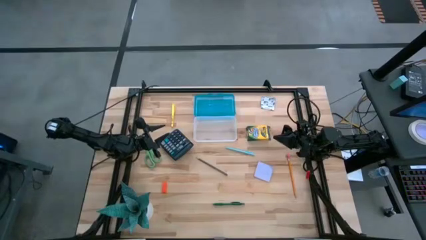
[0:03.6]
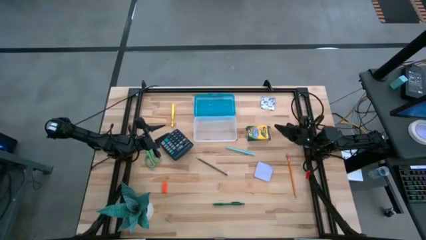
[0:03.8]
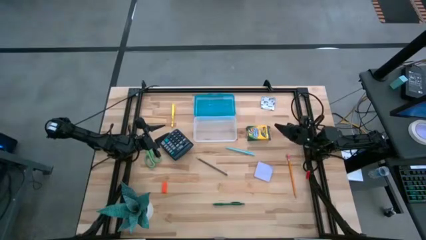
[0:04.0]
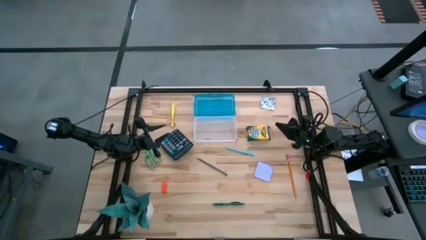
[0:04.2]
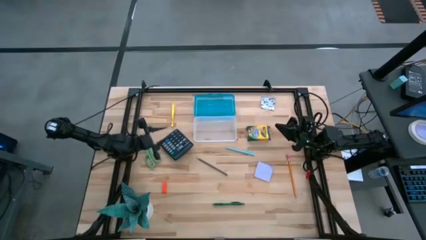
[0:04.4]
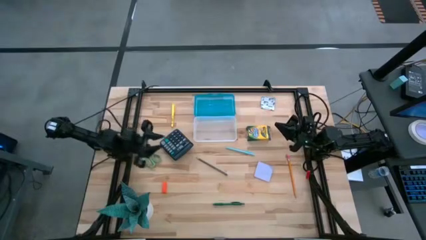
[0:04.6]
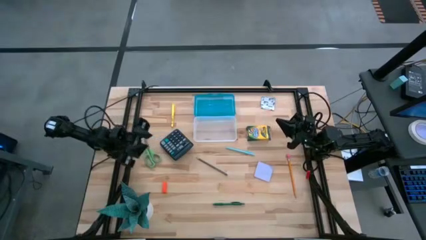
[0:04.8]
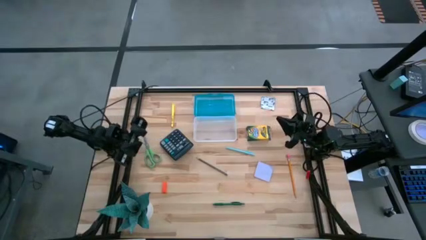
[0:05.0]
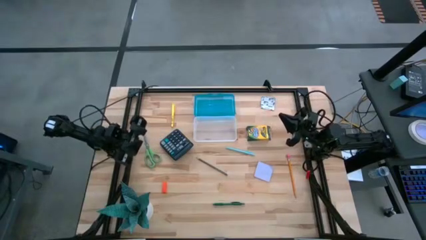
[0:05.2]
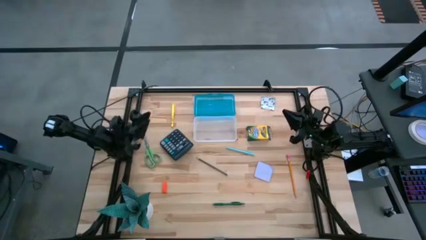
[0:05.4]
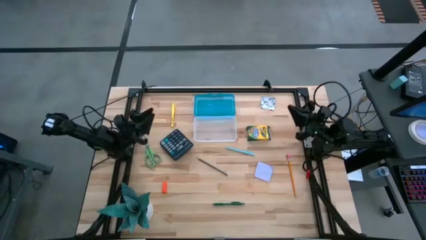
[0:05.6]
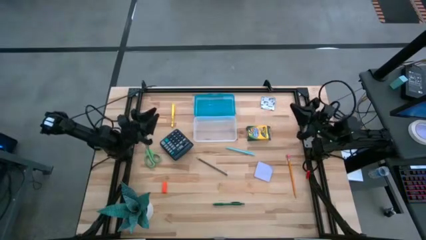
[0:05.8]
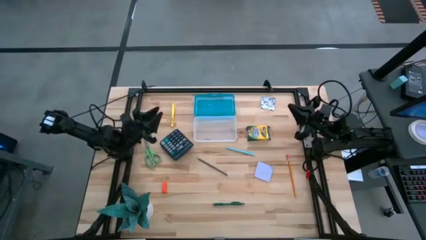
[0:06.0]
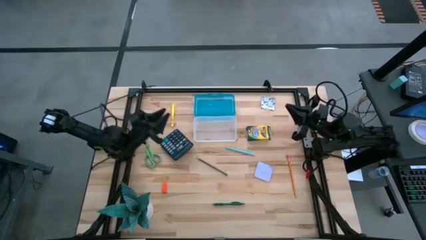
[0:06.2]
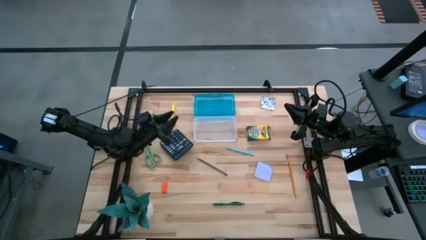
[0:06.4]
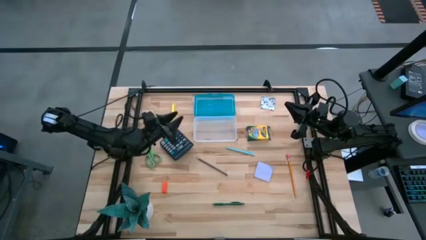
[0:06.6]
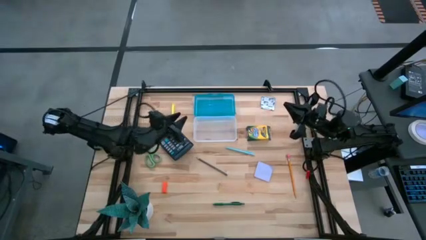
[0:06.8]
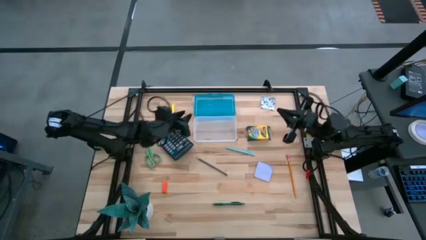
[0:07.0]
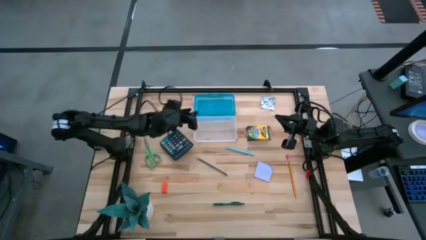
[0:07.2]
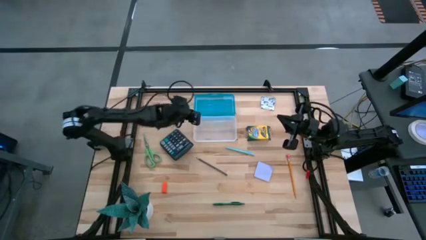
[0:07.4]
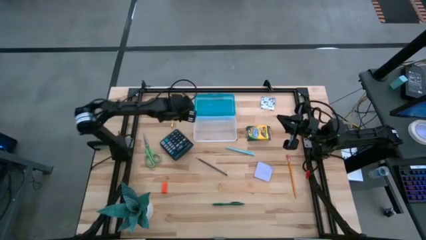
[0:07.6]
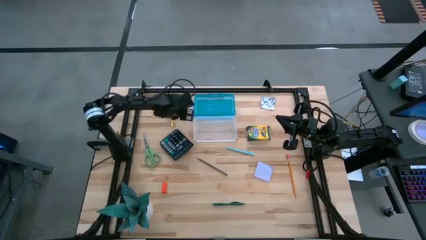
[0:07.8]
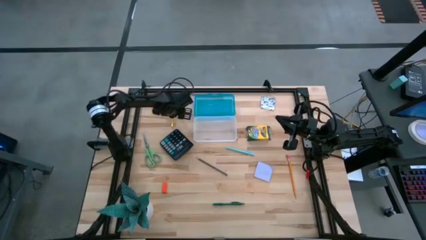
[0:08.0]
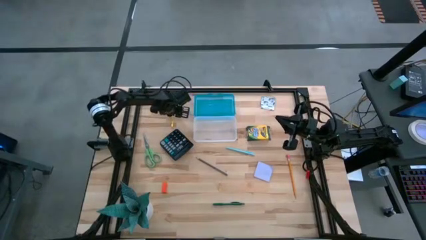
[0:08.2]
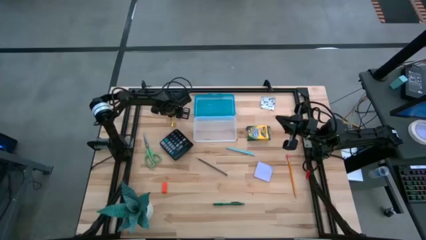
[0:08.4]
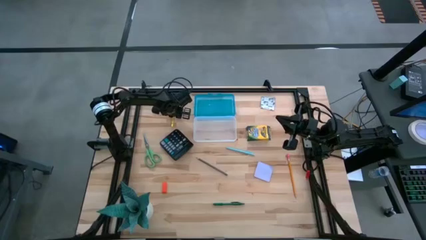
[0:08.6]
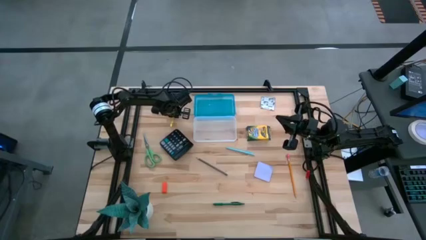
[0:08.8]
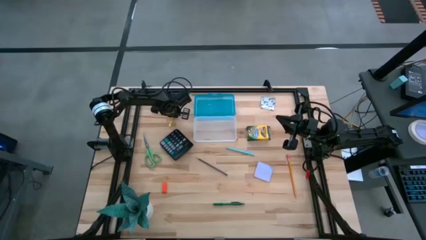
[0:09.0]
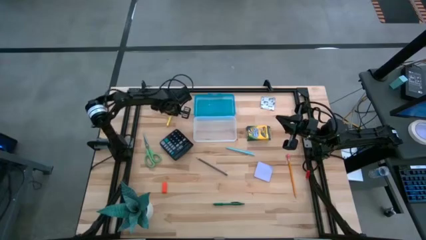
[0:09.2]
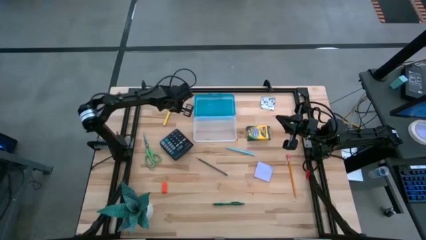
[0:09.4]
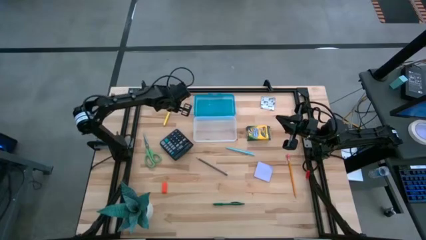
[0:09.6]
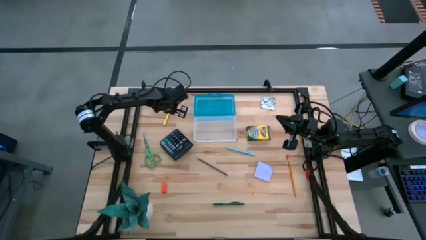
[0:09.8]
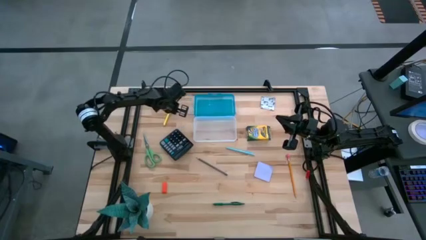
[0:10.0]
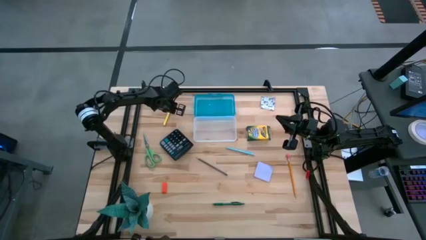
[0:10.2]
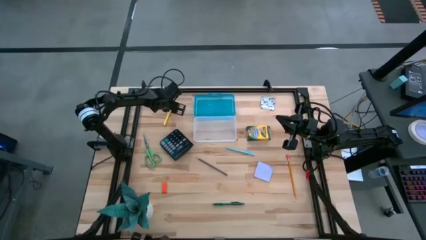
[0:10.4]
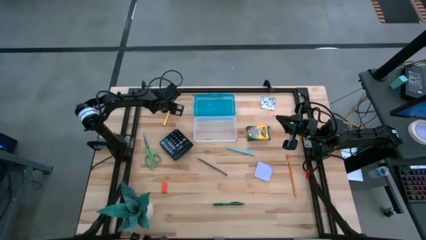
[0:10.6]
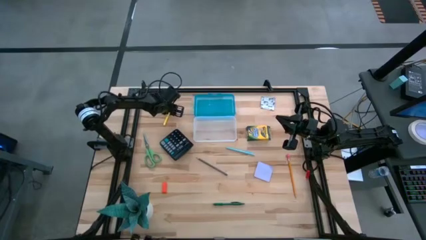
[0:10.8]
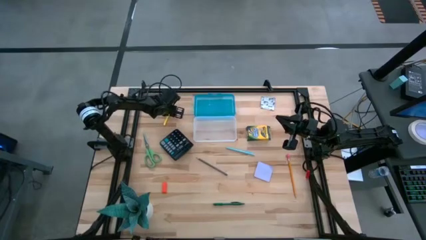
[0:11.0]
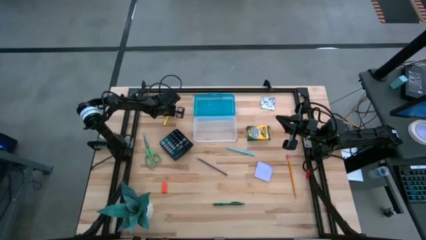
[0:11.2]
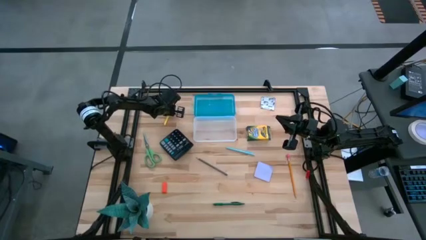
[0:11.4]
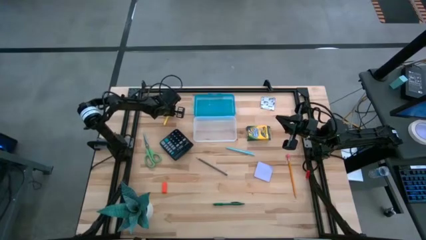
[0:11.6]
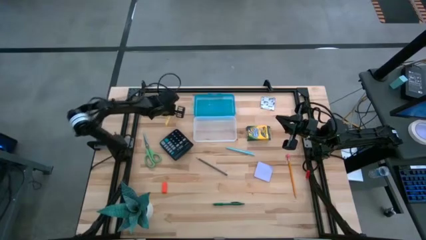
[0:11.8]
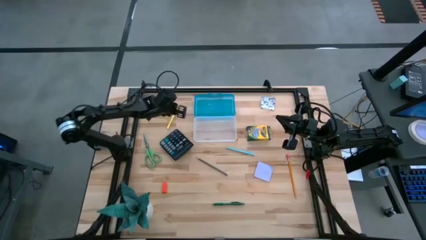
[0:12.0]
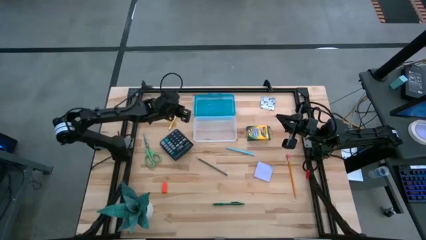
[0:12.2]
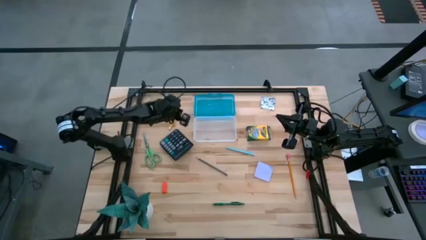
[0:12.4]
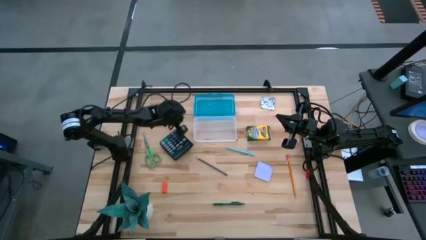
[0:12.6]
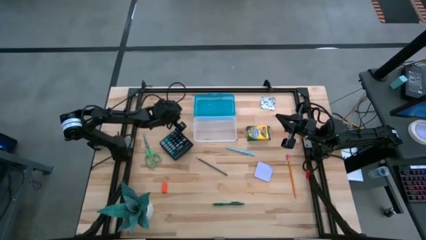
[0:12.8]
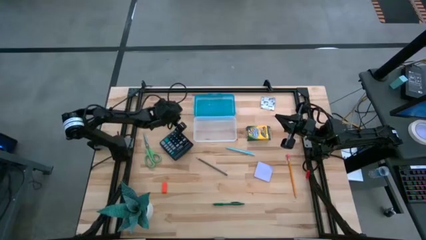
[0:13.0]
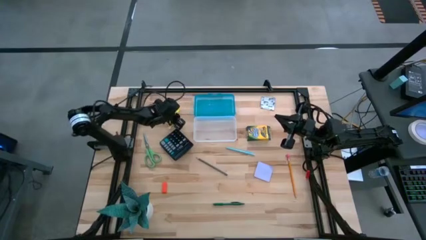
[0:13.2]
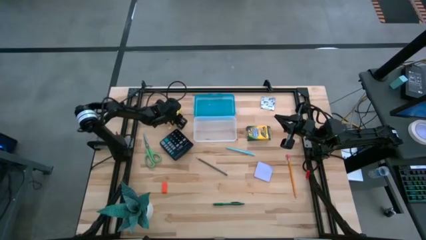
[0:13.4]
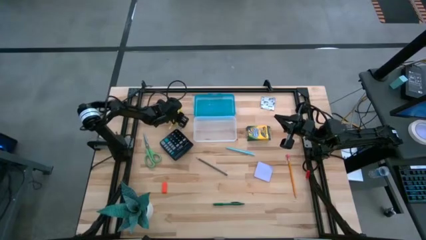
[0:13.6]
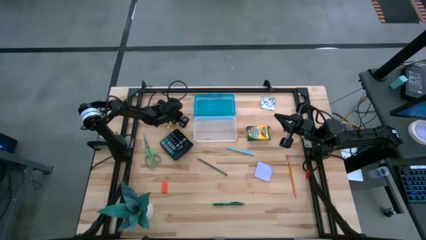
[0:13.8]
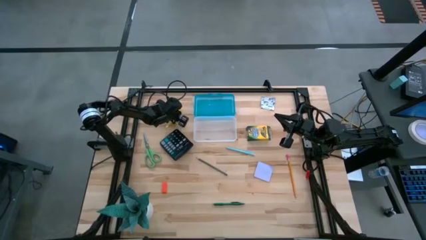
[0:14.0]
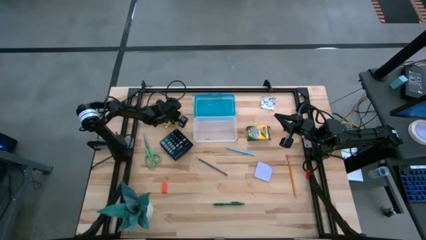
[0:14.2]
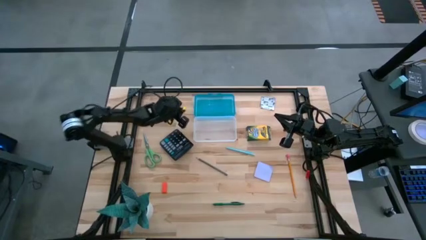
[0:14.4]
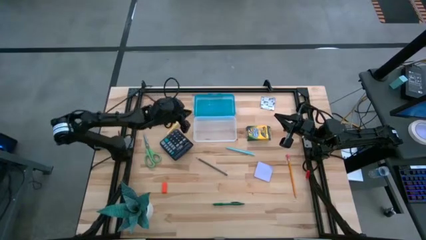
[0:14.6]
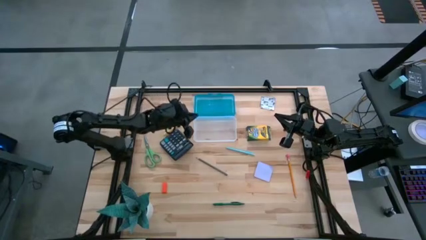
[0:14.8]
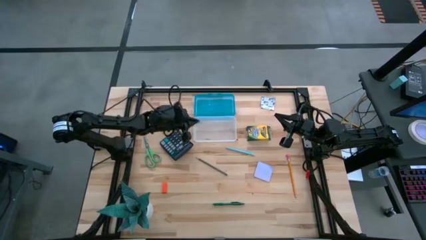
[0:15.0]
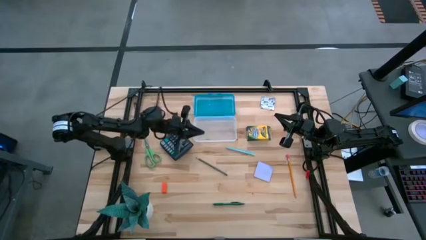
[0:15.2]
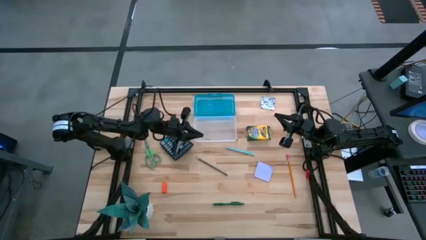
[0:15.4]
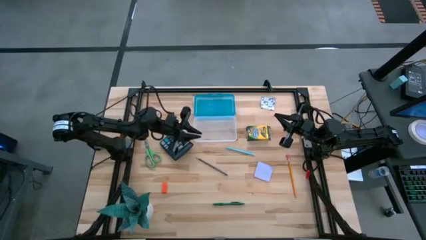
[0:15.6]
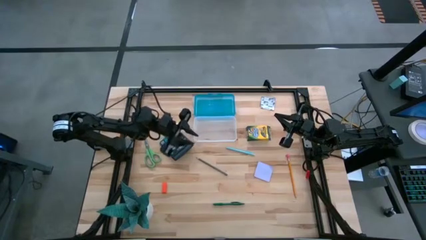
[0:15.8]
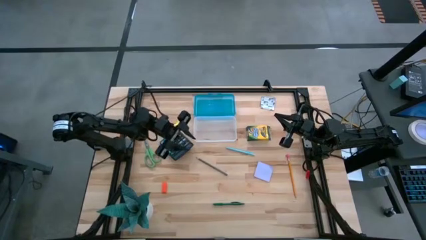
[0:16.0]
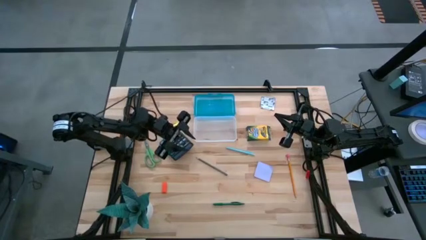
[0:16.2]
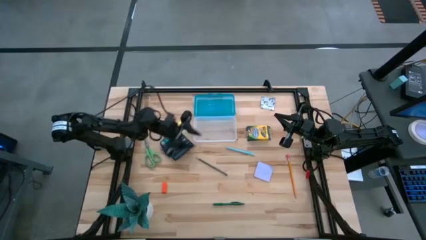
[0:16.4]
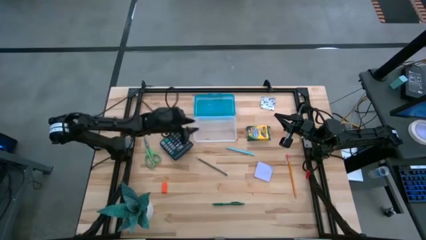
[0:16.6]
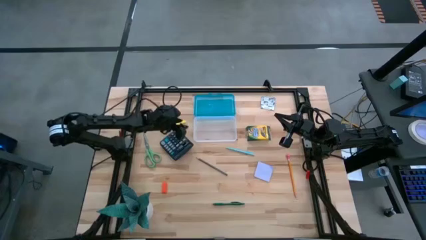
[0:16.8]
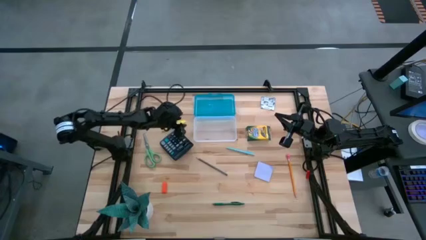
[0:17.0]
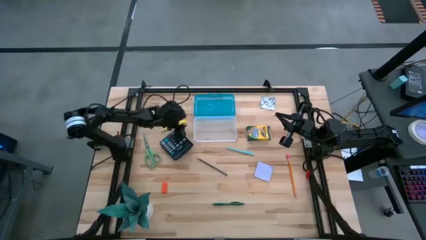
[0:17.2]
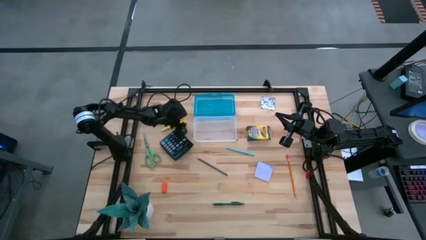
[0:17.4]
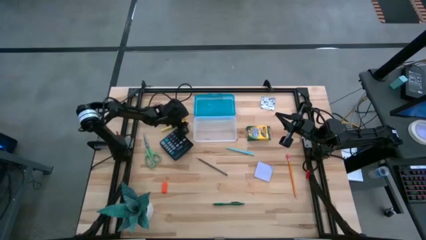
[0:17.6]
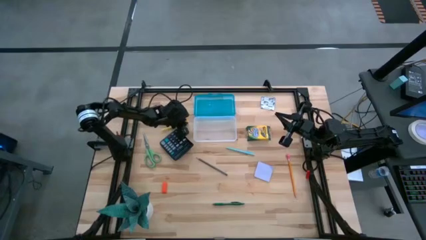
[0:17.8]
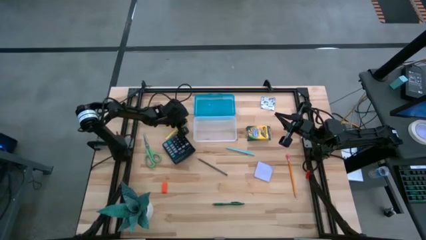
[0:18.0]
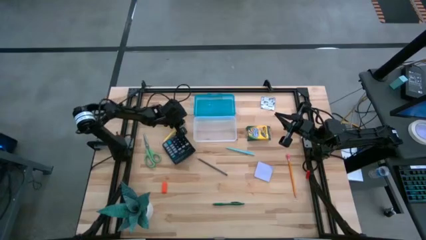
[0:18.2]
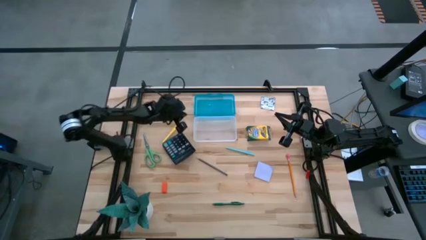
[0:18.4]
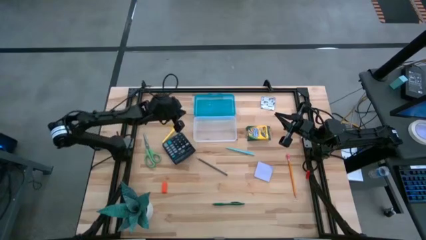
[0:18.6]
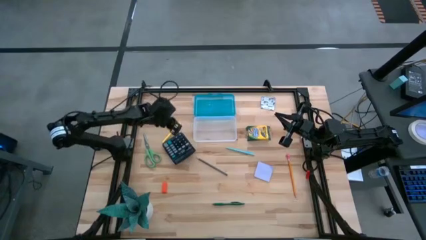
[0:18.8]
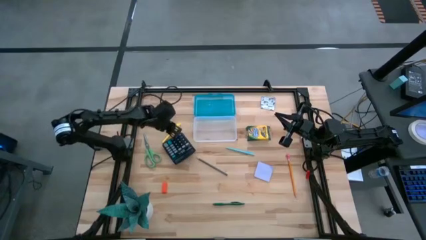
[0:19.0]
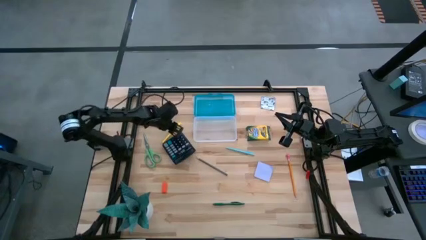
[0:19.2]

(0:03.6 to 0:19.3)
Task: Pack school essentials
Put the yellow pen into the blue supply box

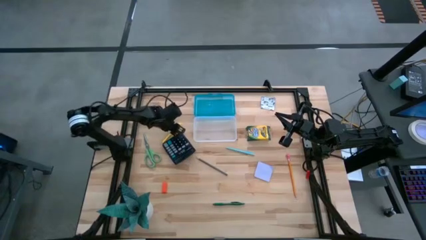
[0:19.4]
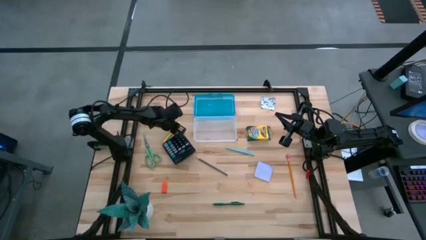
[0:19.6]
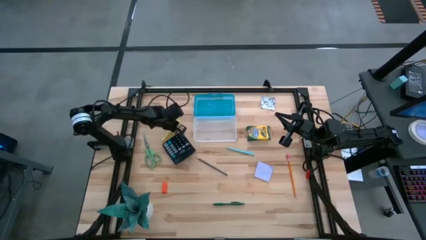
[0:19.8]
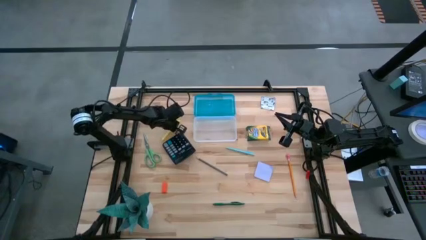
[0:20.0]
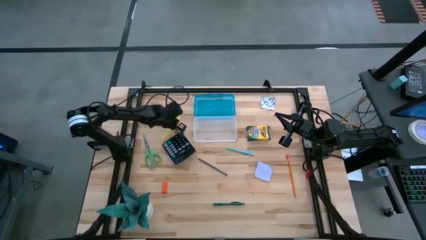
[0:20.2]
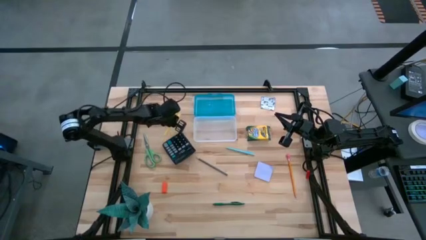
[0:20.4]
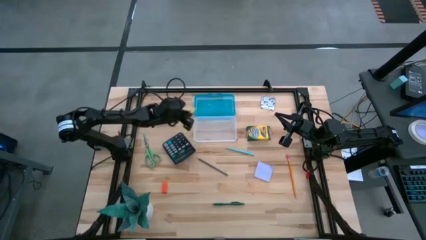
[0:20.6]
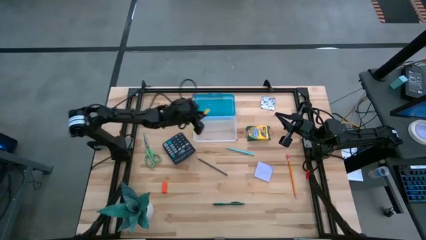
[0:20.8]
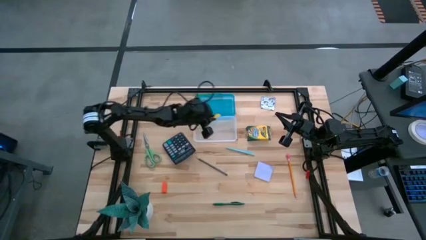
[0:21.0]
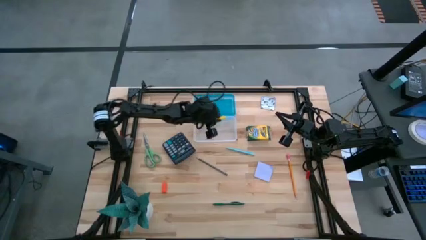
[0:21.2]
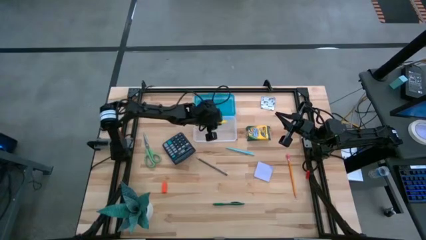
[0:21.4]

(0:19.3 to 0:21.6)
Put the yellow pen into the blue supply box
